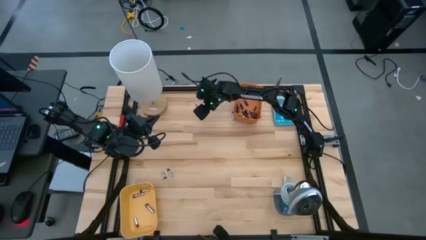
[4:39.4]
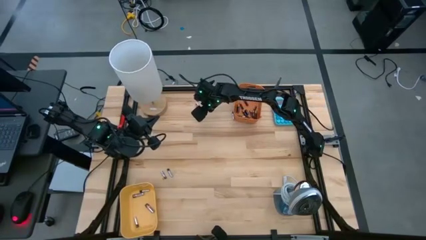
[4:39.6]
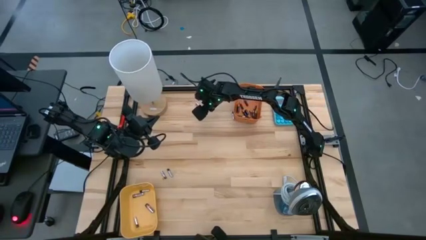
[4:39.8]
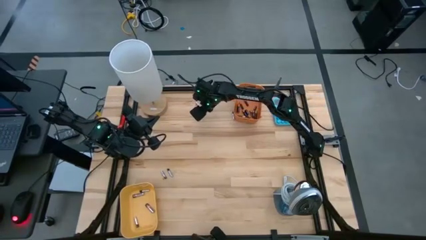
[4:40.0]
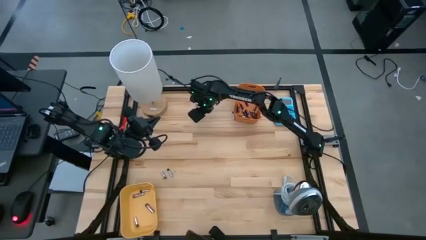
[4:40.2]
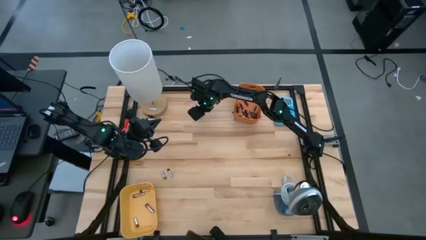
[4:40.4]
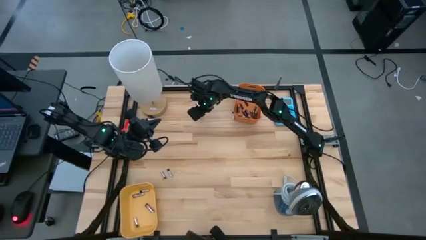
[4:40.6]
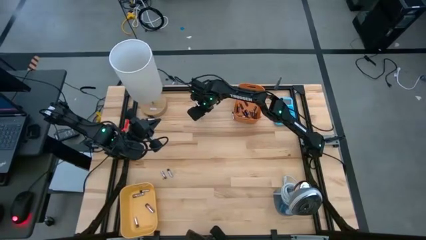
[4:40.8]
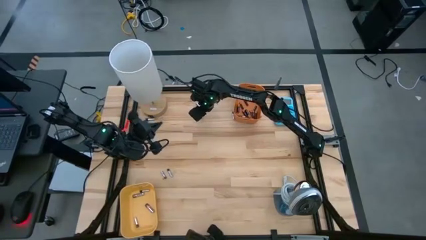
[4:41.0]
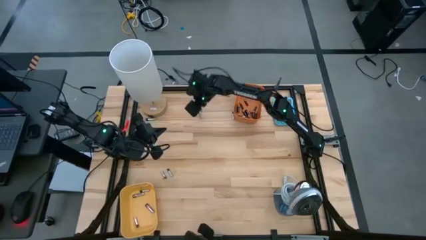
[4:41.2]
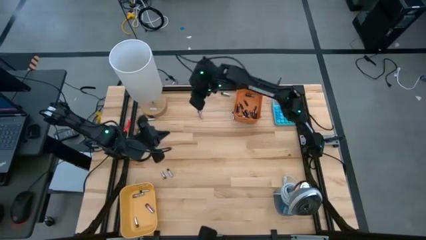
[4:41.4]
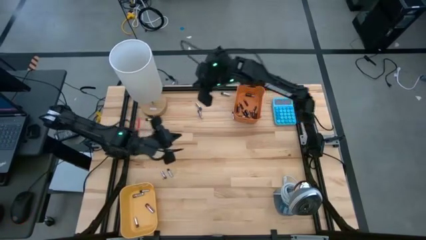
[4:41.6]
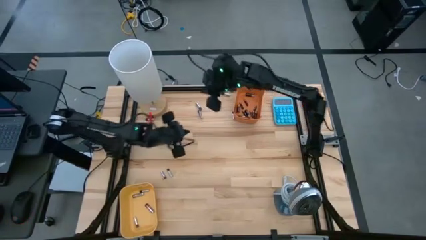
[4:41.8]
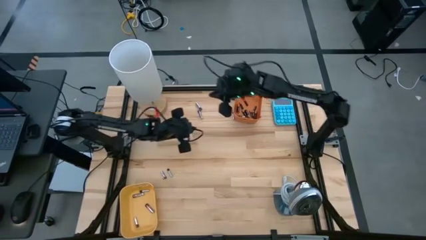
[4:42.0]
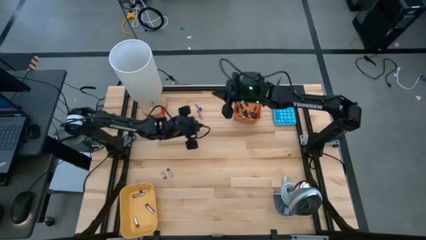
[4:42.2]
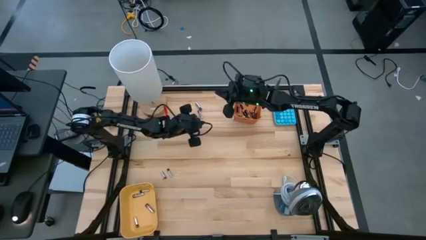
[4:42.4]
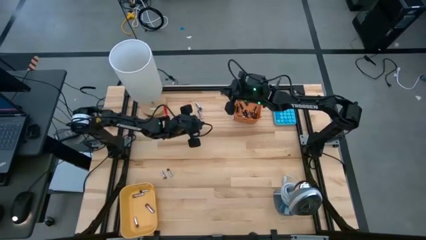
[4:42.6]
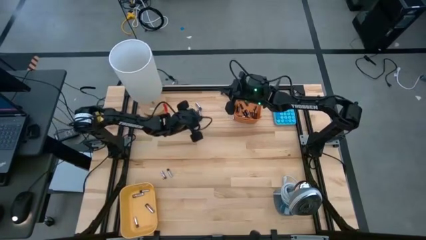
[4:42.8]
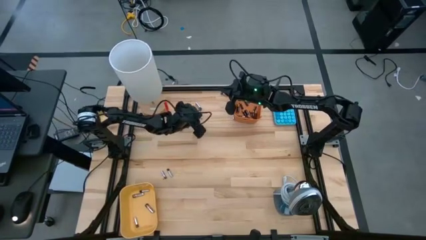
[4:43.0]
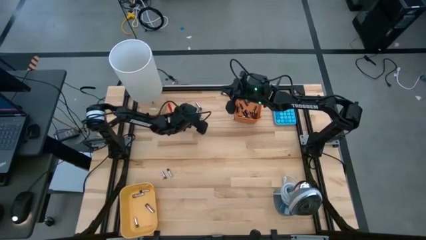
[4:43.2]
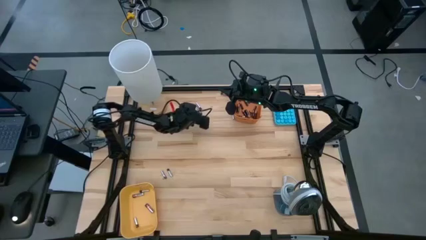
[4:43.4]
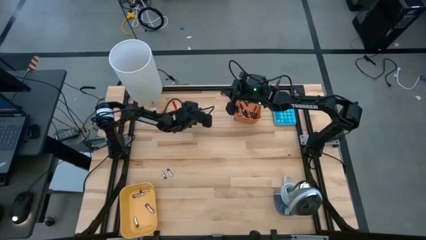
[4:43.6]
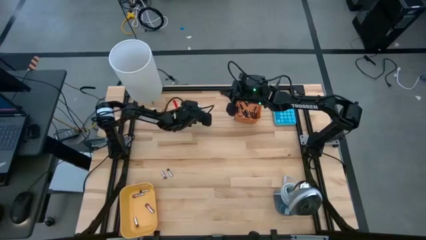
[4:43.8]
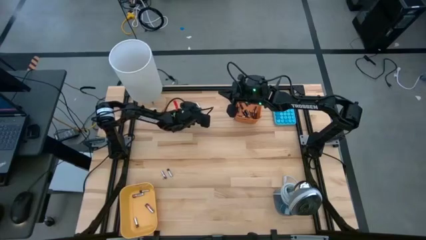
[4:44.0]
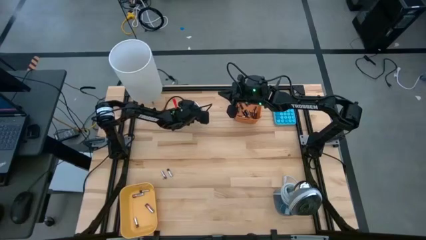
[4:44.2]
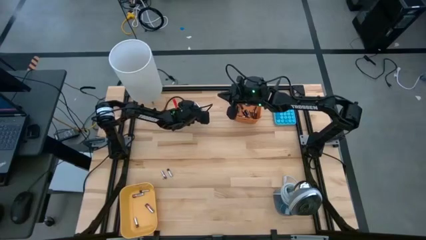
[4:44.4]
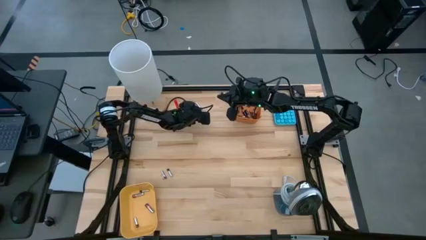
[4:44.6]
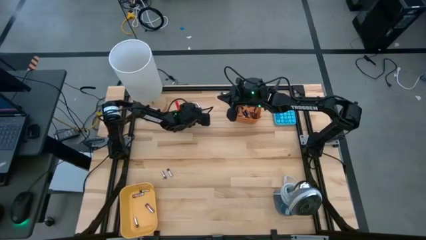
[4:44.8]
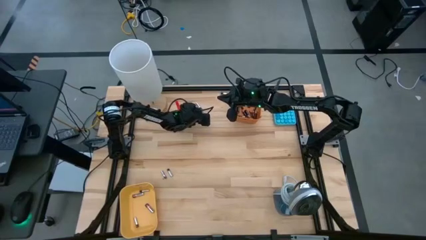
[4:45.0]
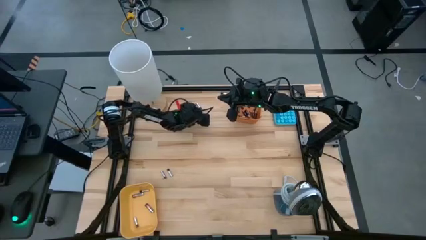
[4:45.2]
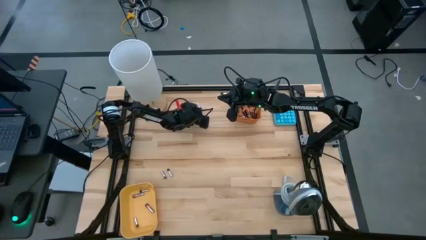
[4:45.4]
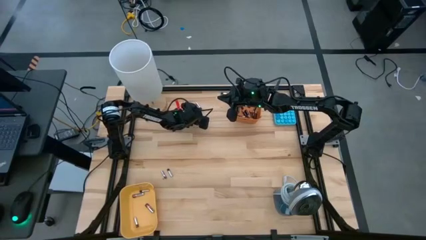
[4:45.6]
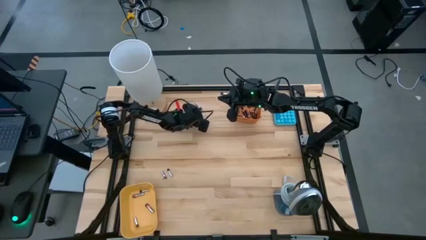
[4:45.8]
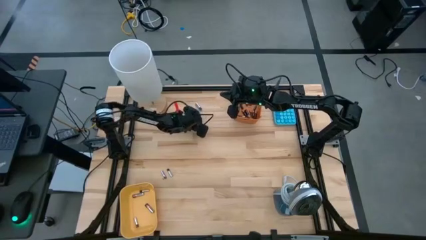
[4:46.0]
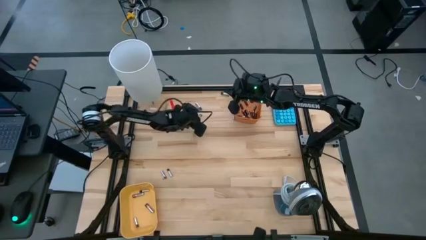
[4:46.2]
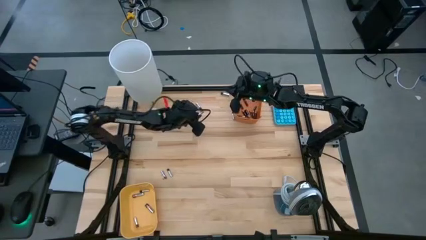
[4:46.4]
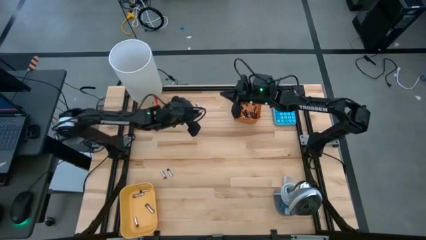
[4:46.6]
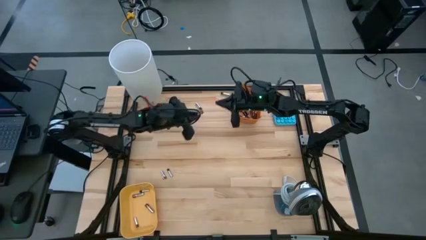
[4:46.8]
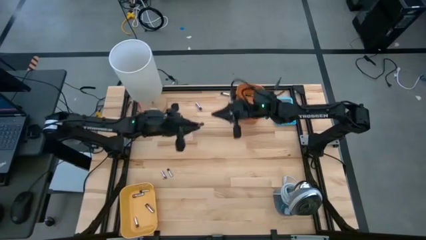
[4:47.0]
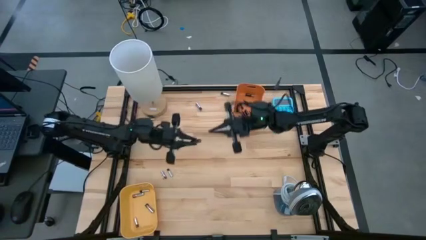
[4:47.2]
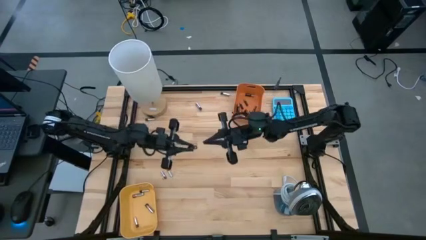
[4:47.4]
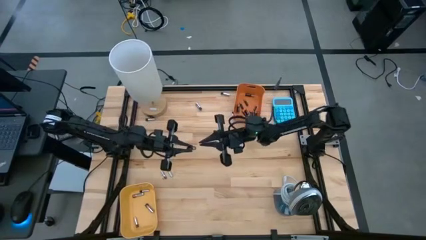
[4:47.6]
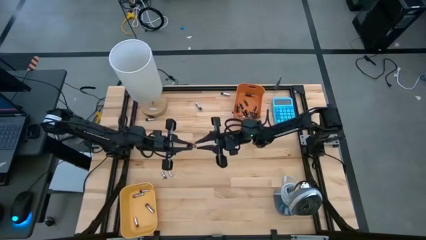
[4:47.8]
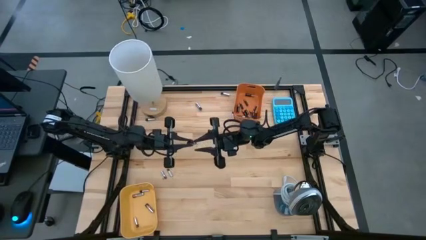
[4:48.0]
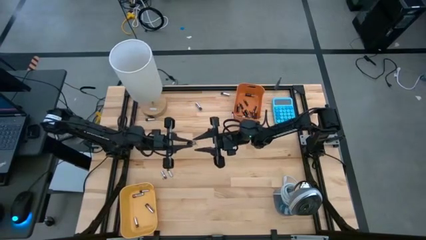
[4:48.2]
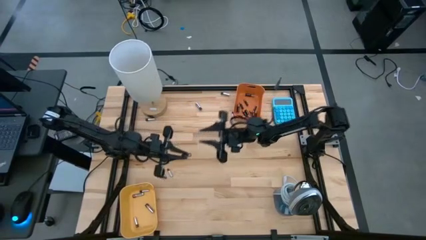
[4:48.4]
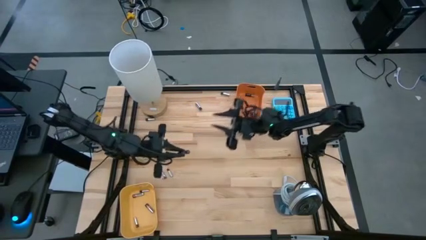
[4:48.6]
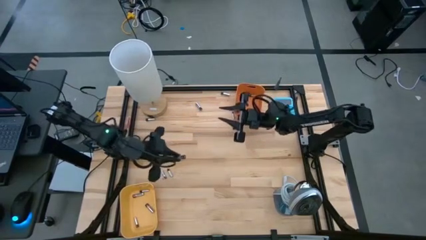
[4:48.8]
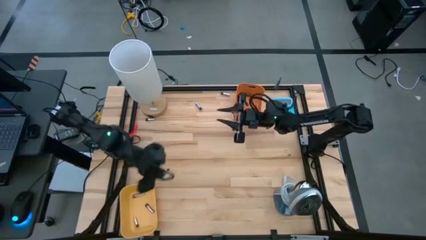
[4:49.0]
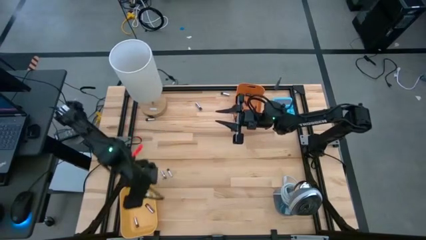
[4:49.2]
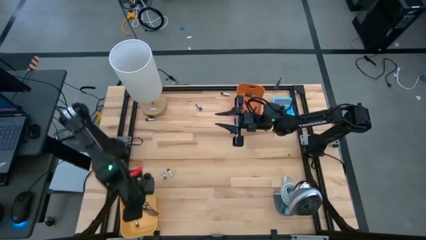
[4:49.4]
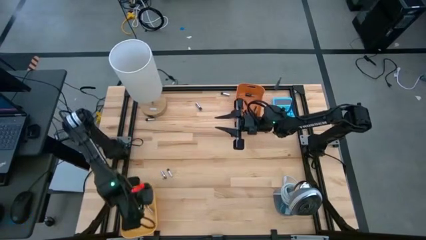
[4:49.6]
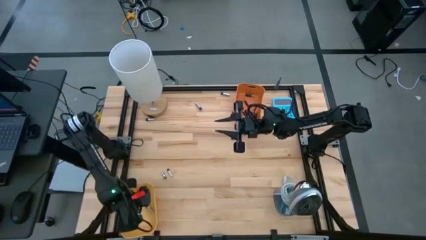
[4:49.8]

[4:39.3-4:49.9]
Task: Sort batteries
Put the silver battery into the yellow bin

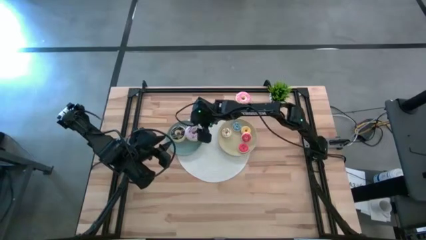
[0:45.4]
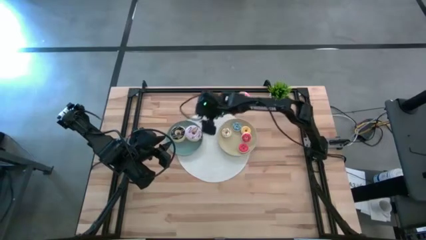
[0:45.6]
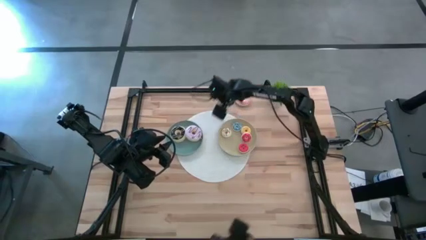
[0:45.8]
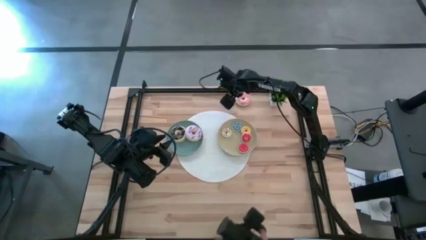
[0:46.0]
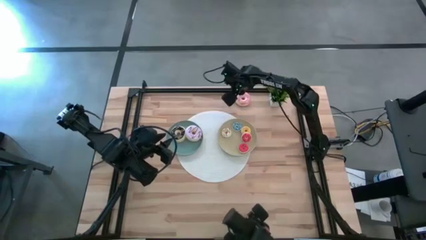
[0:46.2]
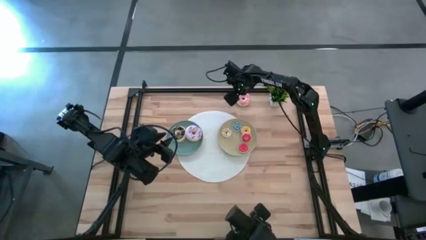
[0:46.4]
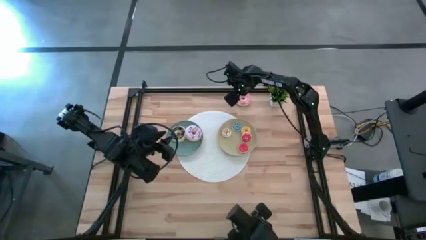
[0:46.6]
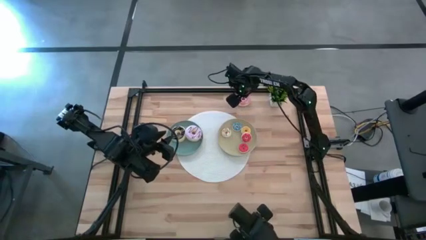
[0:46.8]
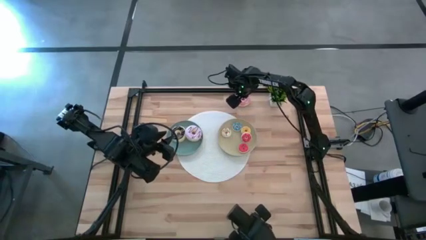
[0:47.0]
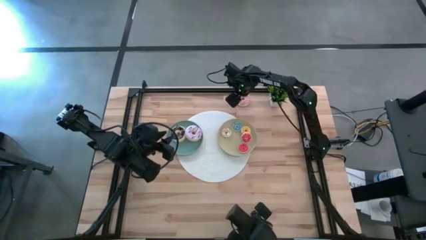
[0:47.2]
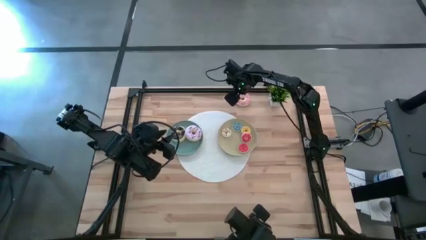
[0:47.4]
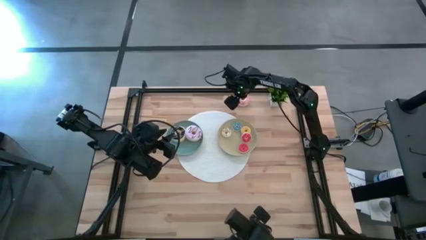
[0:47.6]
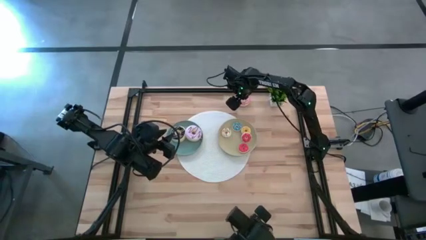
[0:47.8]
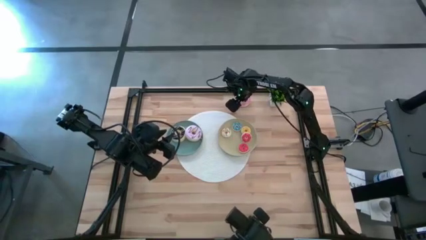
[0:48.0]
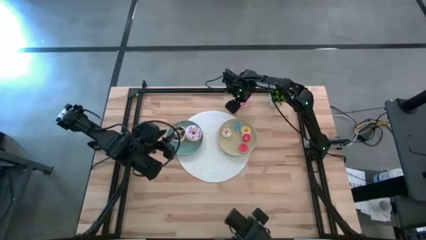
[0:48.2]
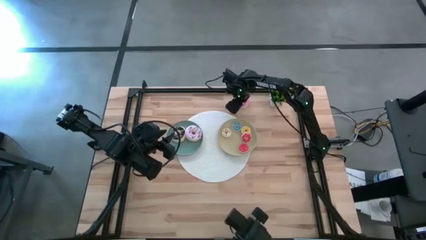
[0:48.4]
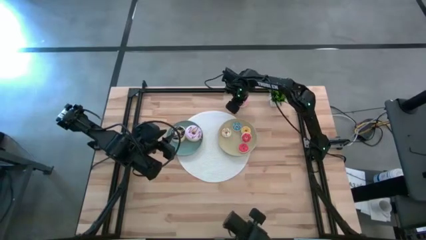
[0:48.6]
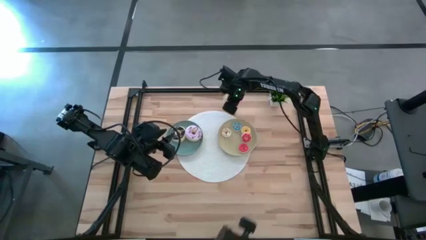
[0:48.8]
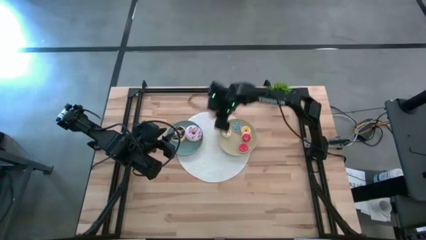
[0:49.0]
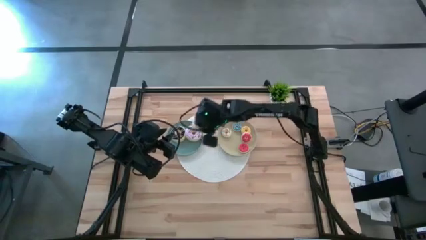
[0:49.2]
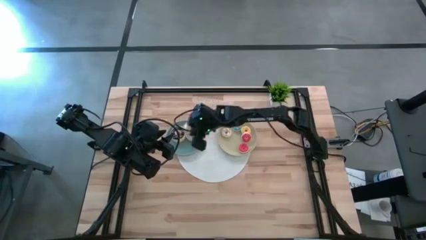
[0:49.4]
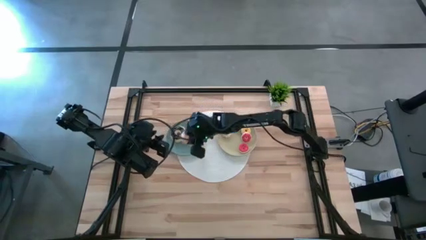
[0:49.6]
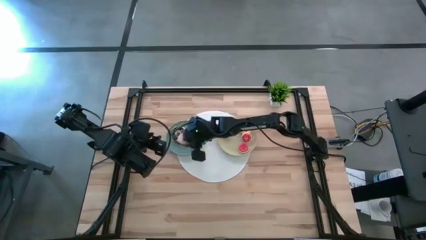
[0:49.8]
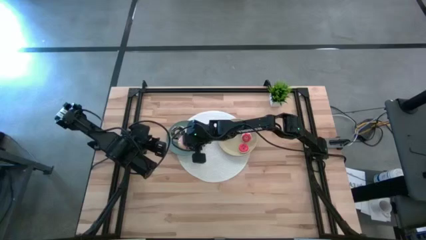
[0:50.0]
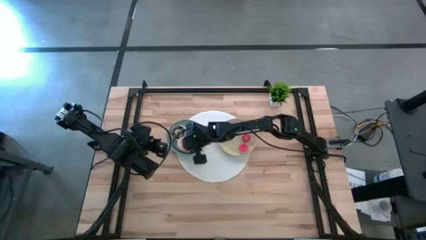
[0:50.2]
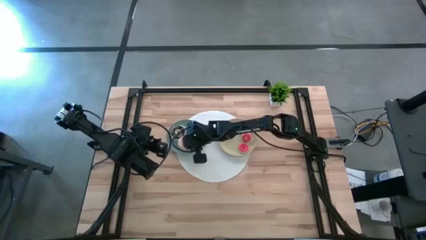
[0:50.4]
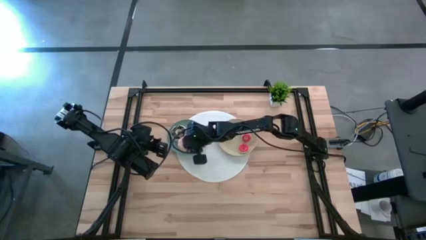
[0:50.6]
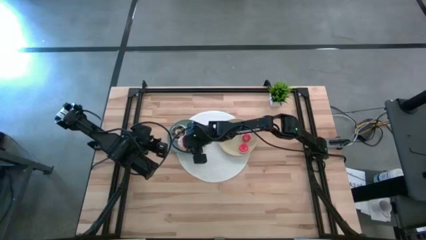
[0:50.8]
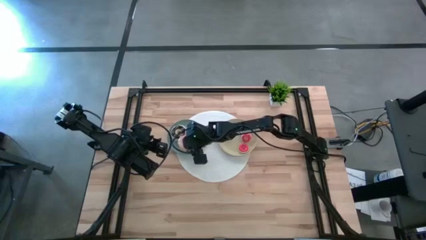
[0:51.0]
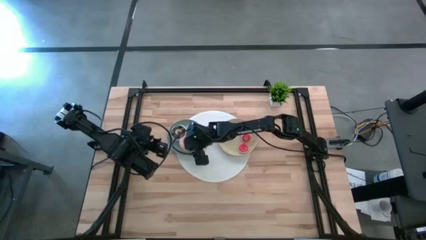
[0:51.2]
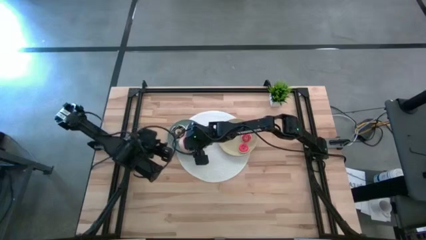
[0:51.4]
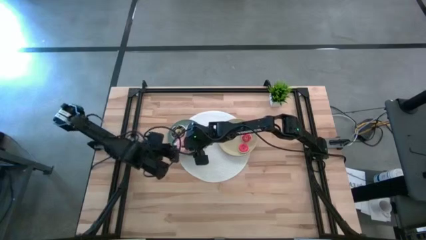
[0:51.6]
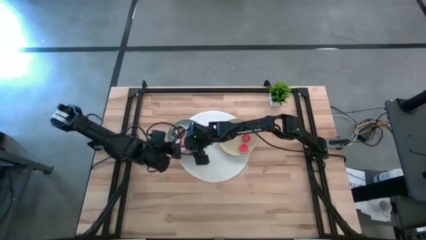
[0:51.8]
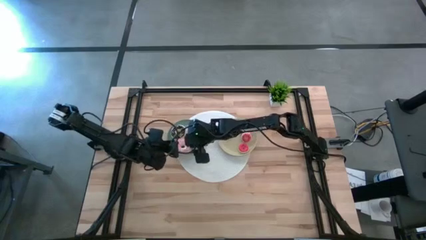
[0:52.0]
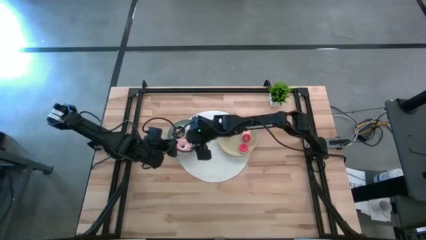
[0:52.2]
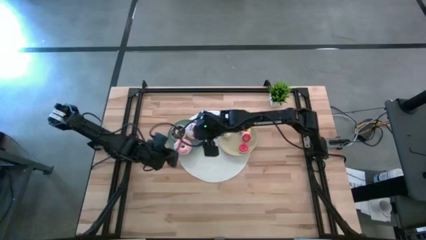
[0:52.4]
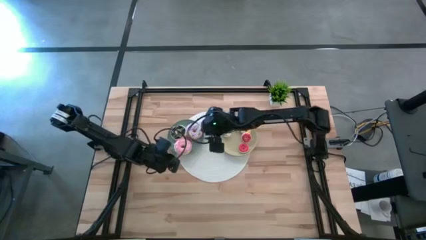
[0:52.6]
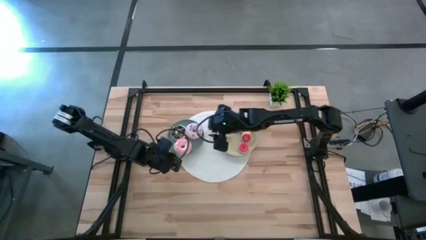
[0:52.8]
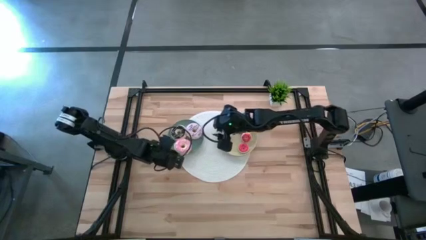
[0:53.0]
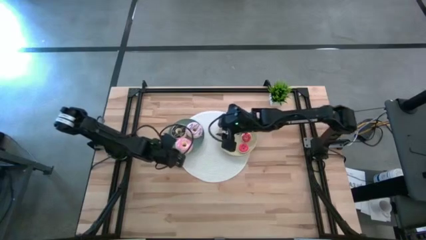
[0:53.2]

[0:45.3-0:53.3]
Task: Pick & Place donuts
Put the big pink donut on the blue plate
